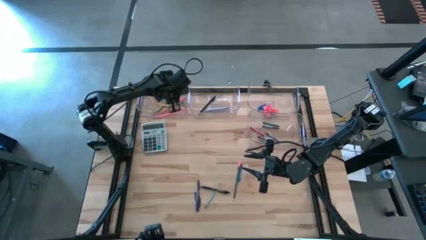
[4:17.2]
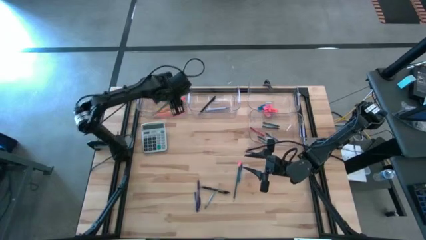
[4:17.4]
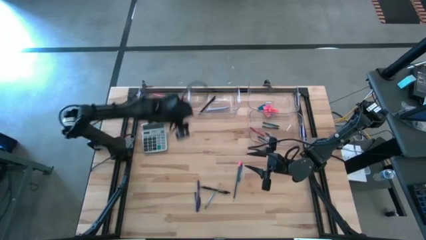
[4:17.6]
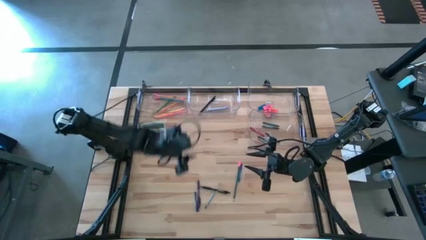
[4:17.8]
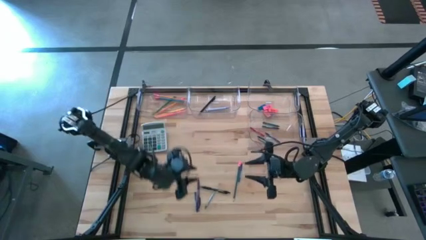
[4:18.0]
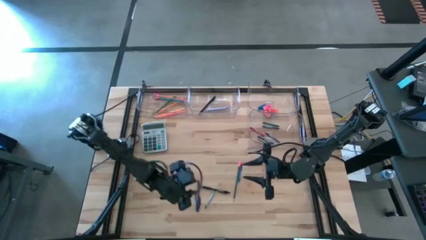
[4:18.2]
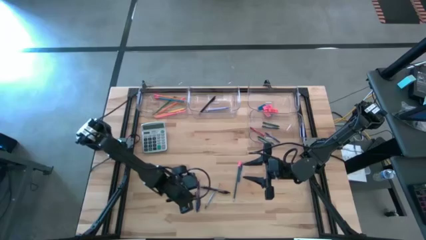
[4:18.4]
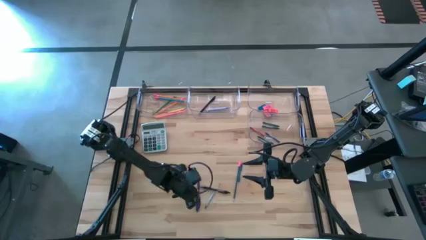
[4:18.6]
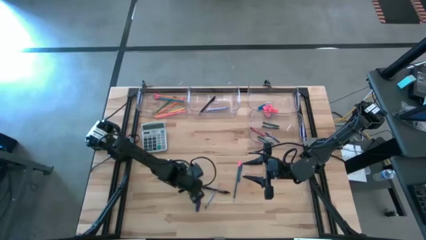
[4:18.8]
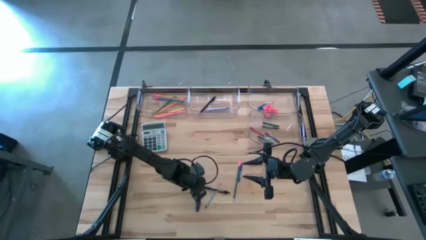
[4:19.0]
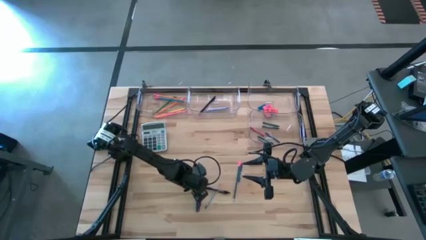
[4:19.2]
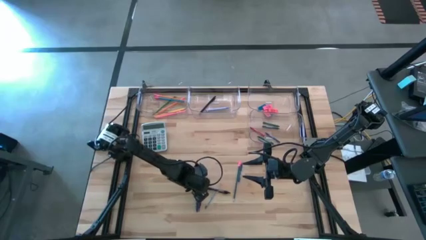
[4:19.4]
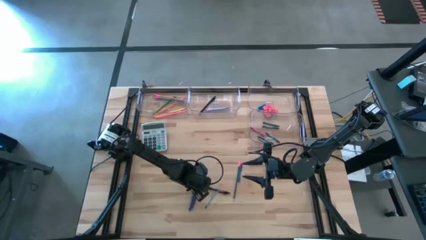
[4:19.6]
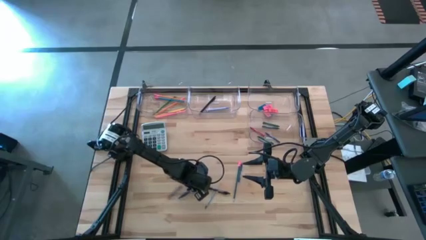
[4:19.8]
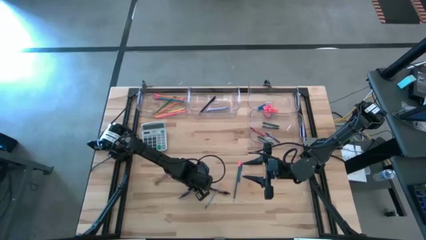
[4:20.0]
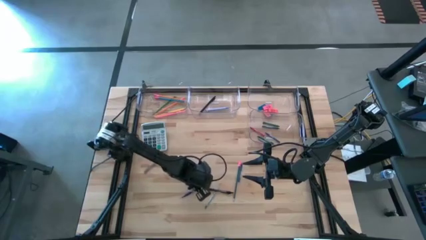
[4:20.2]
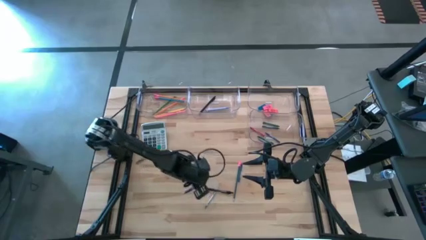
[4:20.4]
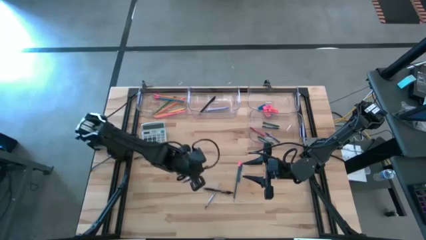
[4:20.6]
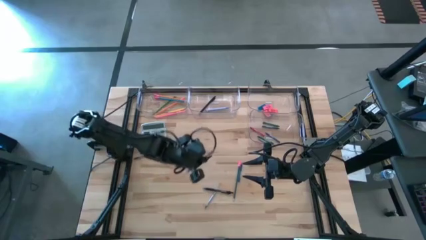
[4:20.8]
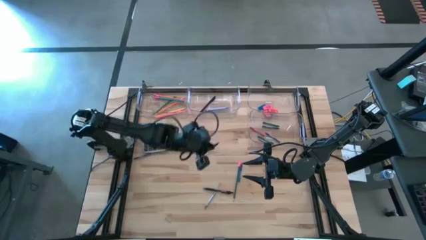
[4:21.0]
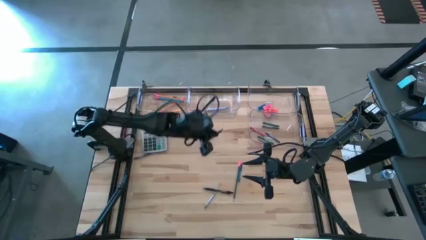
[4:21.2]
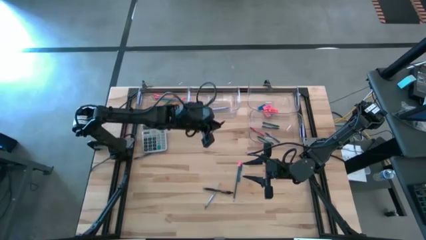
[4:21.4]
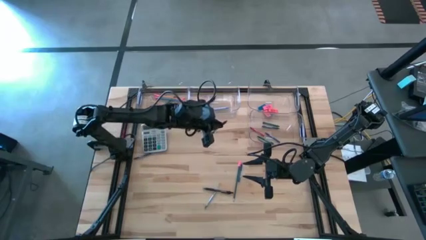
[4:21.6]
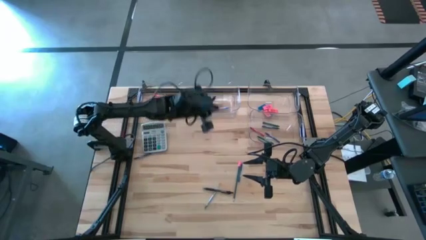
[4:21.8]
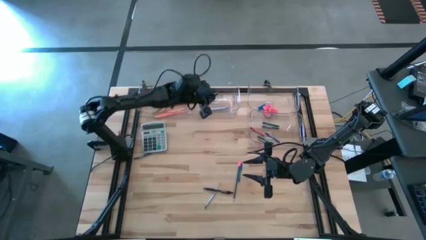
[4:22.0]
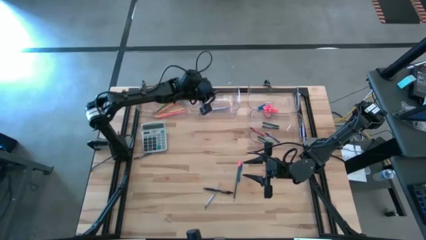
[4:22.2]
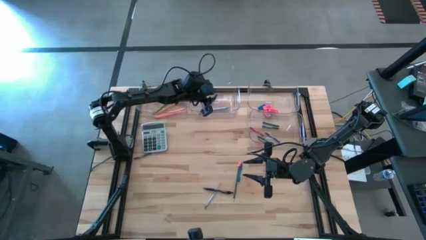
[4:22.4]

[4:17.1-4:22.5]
Task: Sort crayons/erasers/pens/pencils in bins
Put the violet pen into the top middle transparent bin

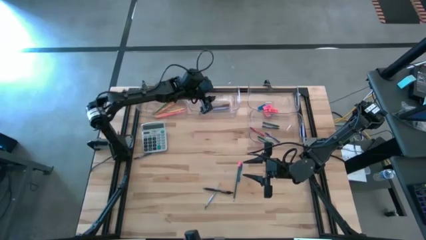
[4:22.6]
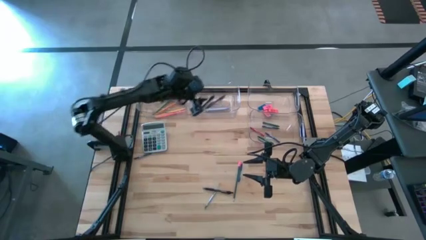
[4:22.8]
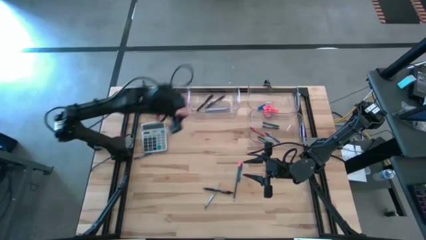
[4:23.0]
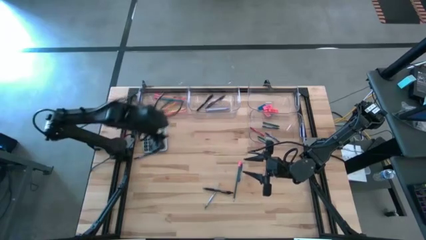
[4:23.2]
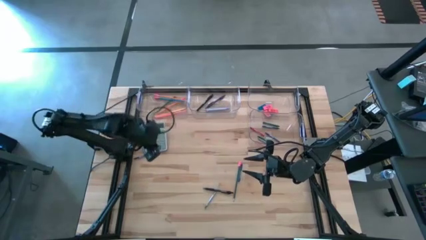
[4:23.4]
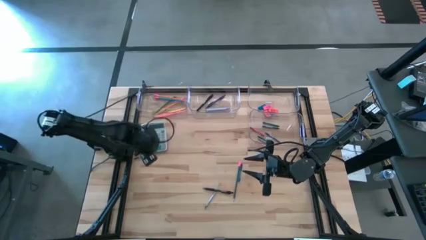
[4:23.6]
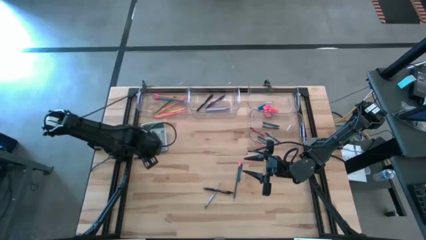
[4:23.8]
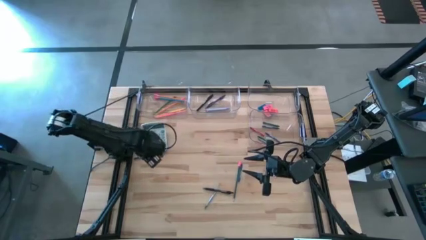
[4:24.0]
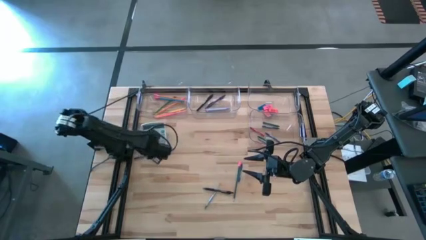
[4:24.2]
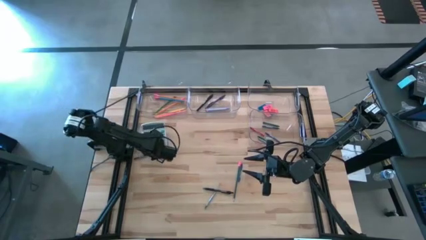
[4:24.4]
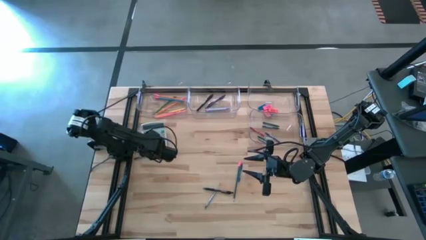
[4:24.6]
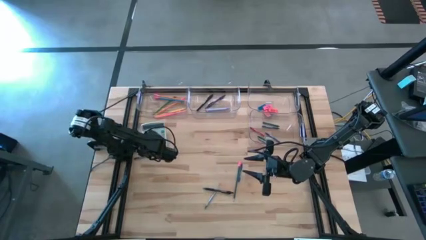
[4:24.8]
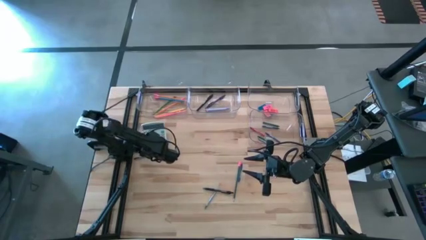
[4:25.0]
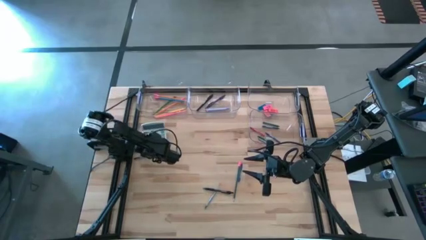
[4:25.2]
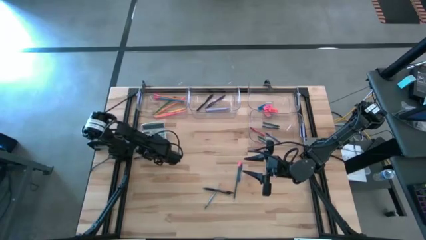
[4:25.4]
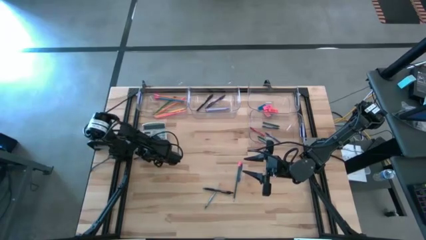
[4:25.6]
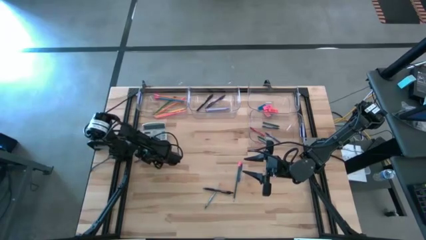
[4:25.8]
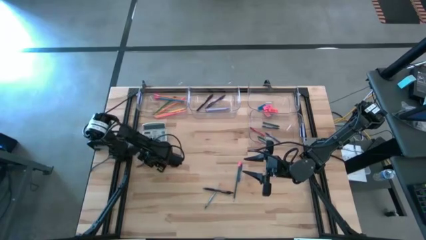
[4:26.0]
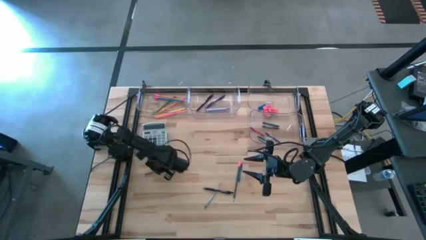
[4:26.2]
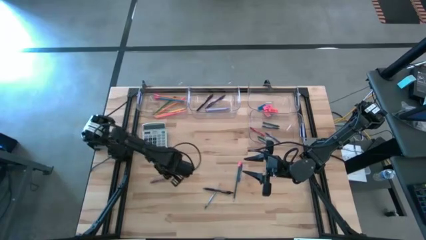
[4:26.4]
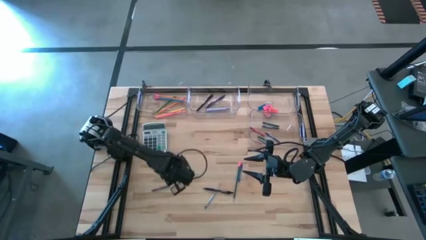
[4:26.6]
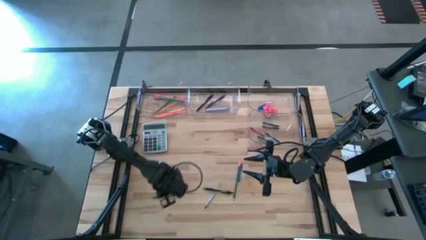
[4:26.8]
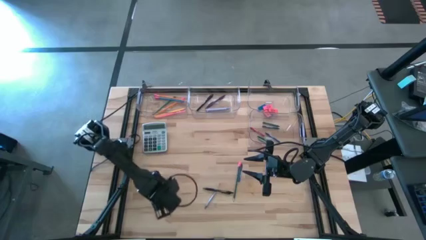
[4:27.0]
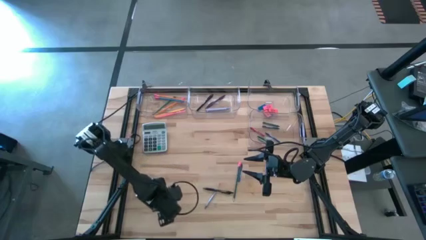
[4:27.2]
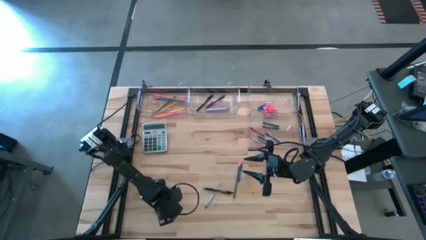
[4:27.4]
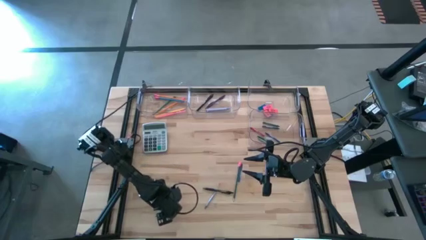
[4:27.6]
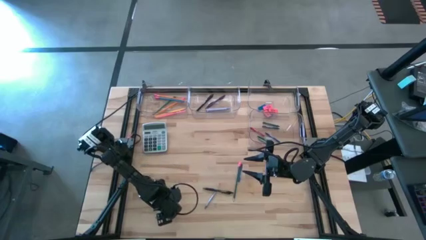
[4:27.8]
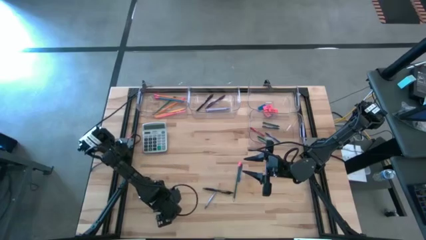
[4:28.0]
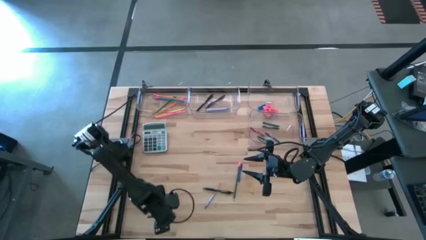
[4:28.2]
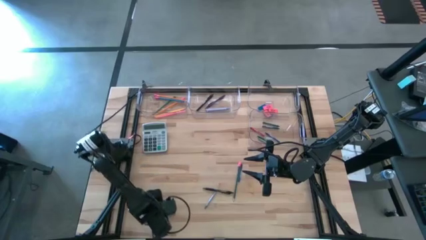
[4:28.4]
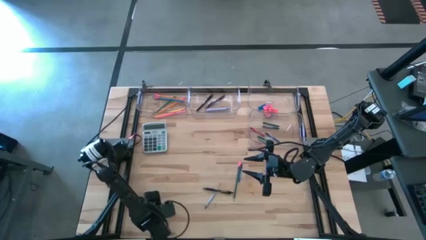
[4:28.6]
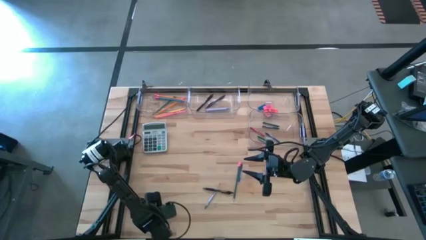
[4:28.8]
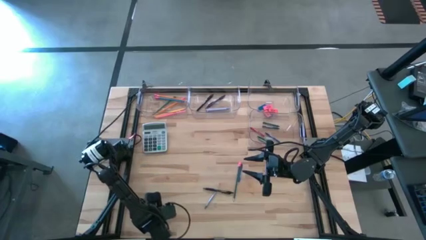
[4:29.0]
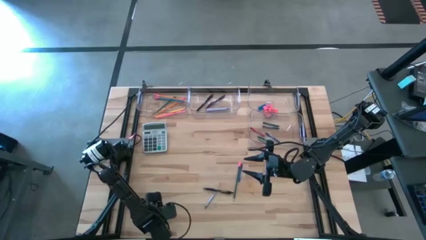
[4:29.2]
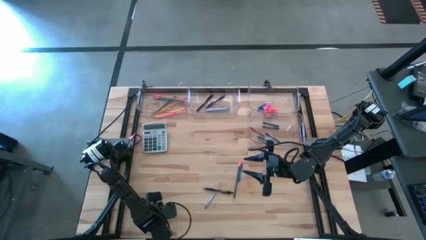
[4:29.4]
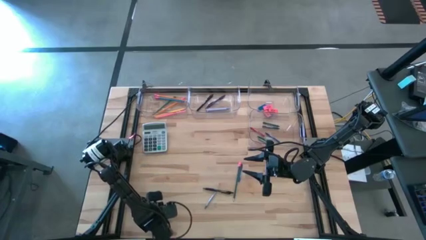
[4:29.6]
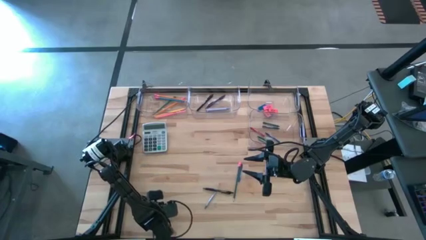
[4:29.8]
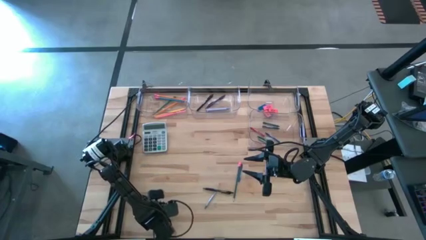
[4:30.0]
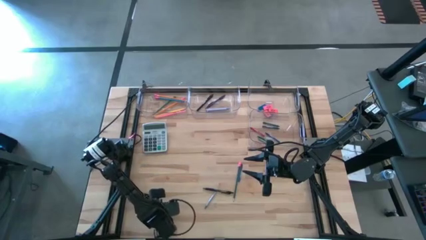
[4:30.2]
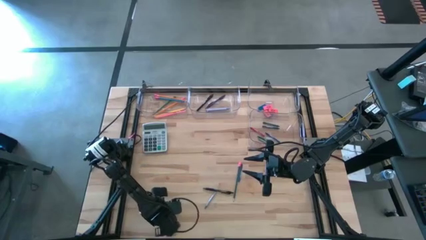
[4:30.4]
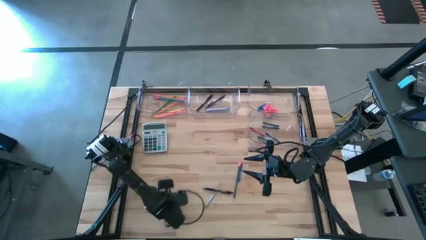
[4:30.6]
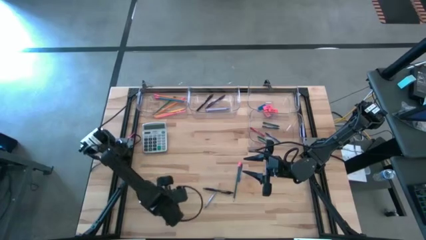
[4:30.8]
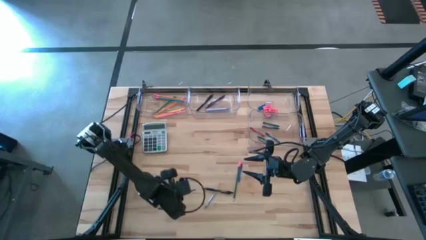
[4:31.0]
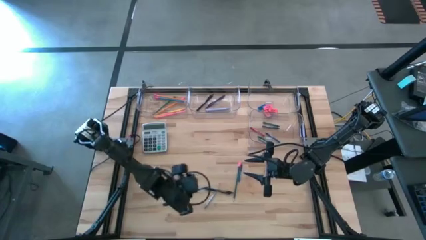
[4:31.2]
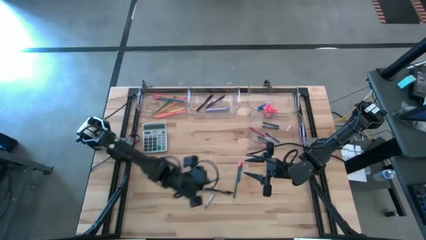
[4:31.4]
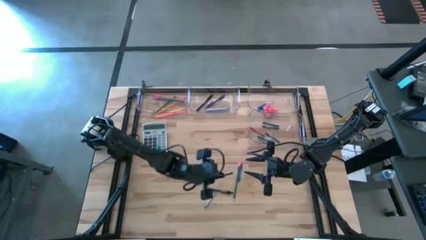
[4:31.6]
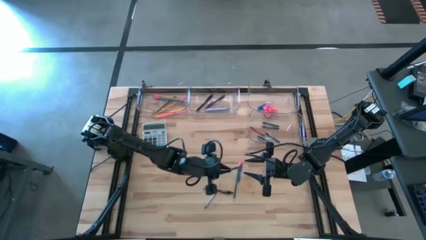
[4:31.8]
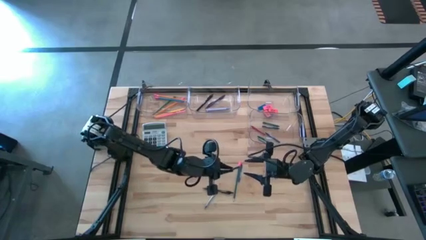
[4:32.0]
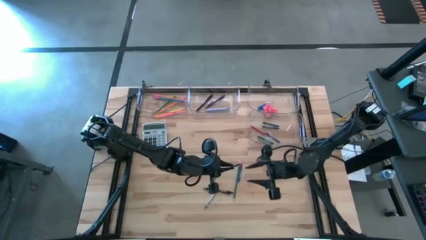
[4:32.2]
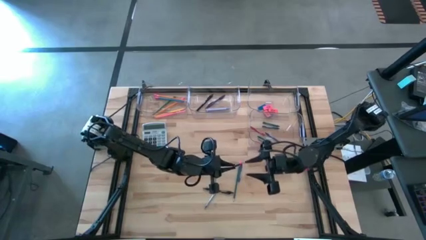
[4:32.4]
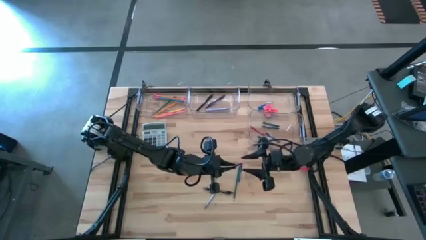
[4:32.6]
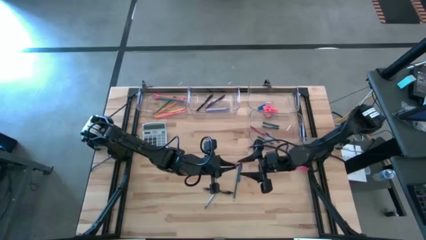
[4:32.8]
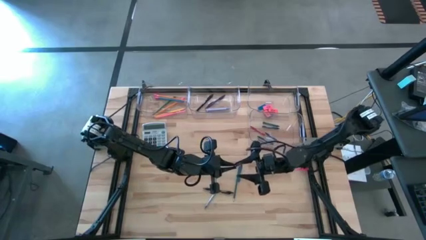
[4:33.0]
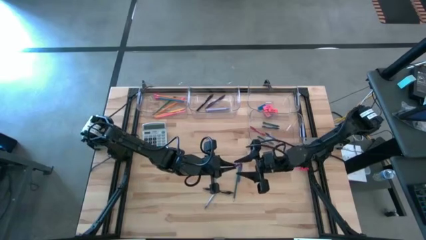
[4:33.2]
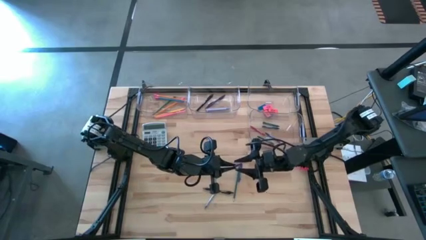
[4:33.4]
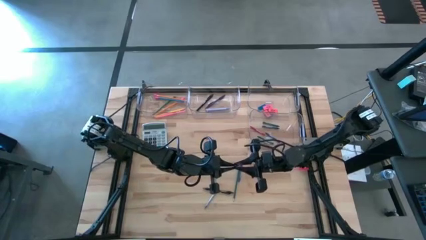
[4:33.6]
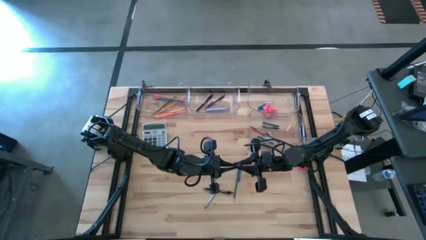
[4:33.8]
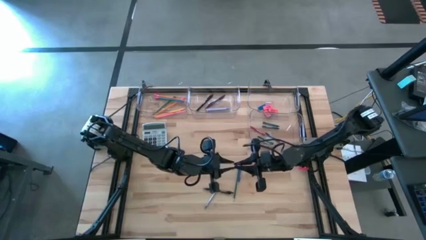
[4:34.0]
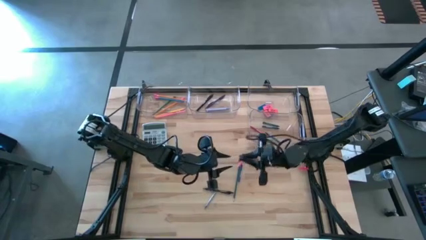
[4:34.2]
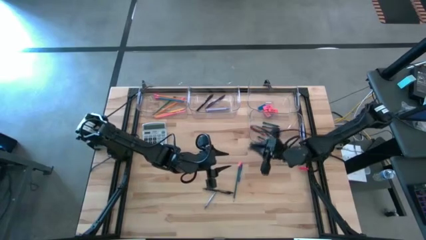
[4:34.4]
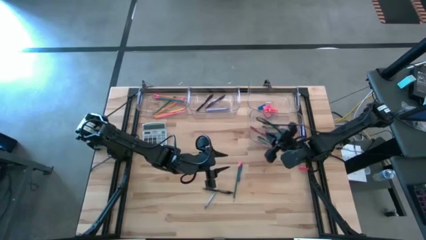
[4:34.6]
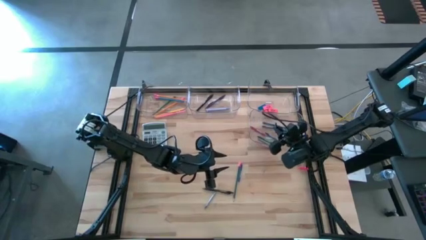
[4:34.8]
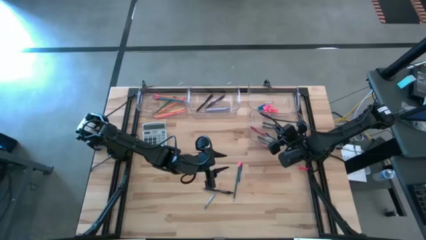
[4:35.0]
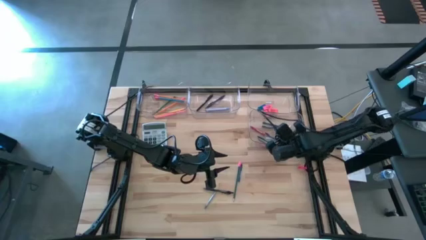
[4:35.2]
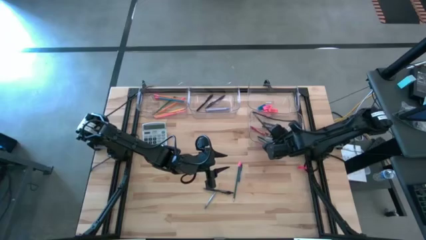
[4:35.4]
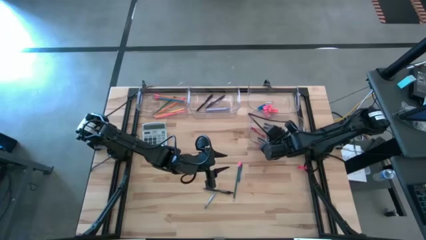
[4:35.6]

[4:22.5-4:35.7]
Put the blue crayon into the bottom transparent bin
